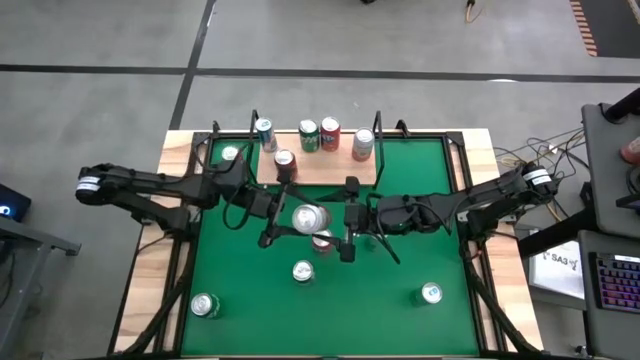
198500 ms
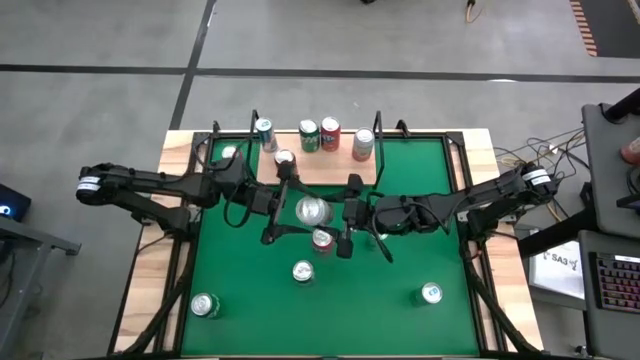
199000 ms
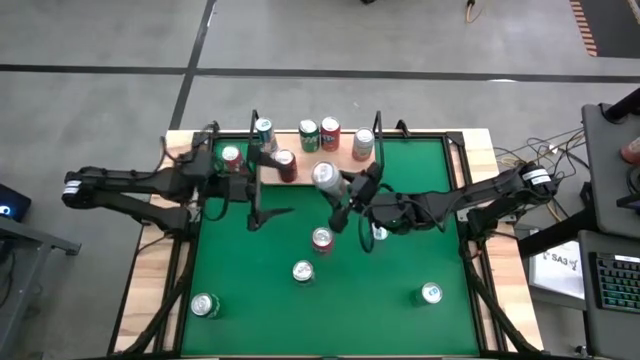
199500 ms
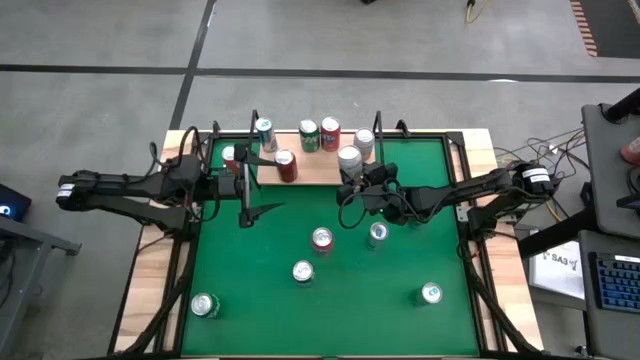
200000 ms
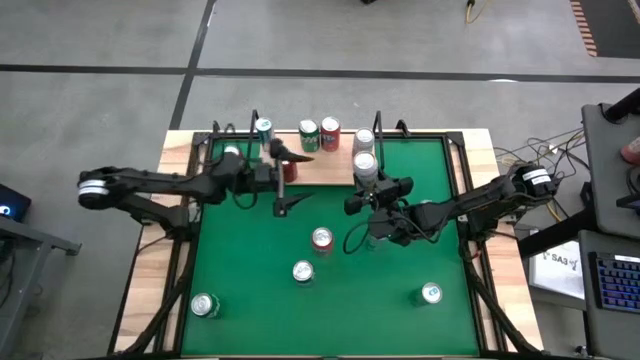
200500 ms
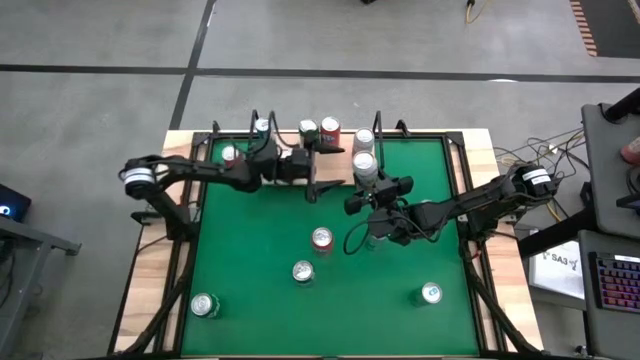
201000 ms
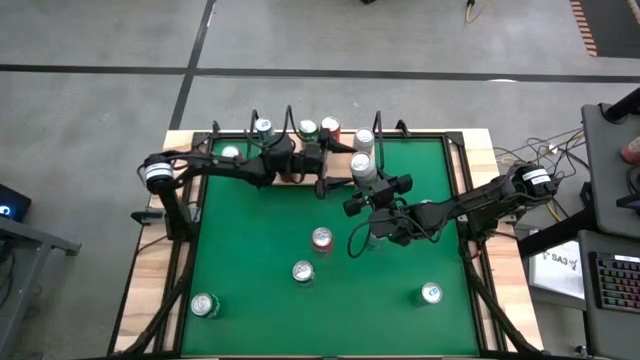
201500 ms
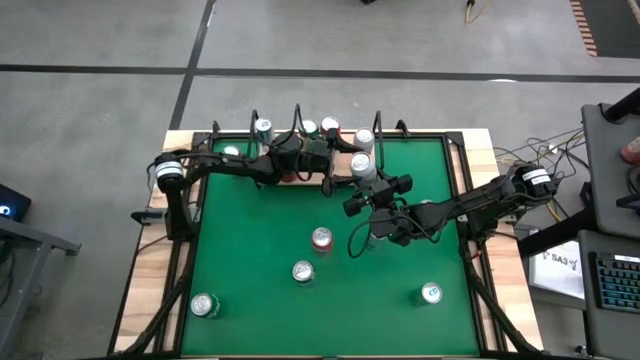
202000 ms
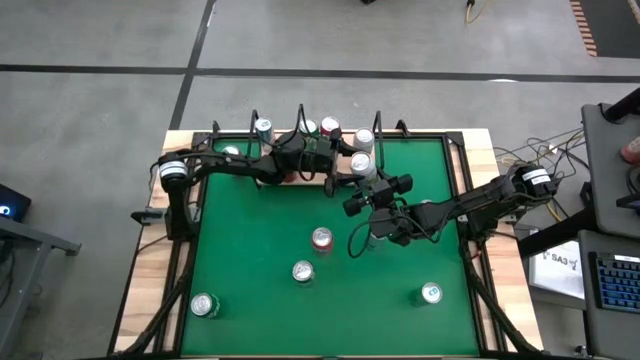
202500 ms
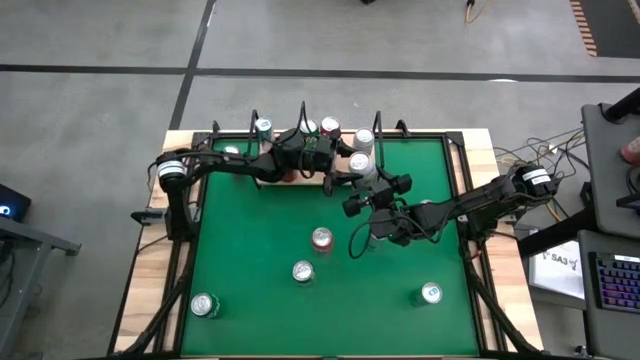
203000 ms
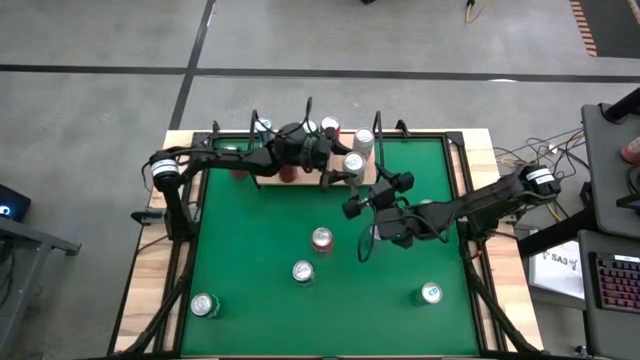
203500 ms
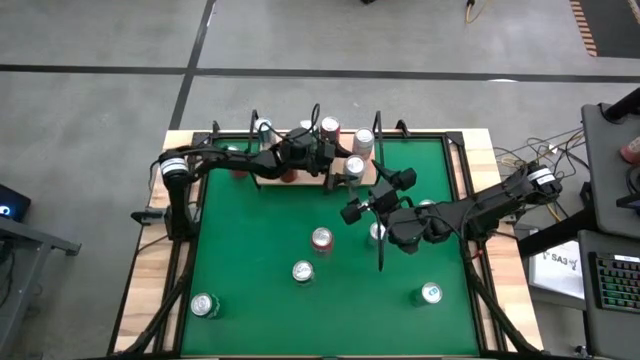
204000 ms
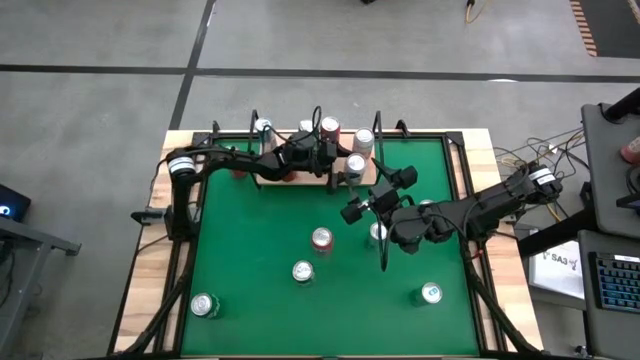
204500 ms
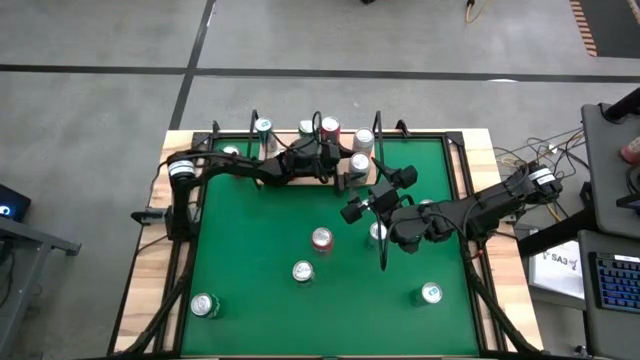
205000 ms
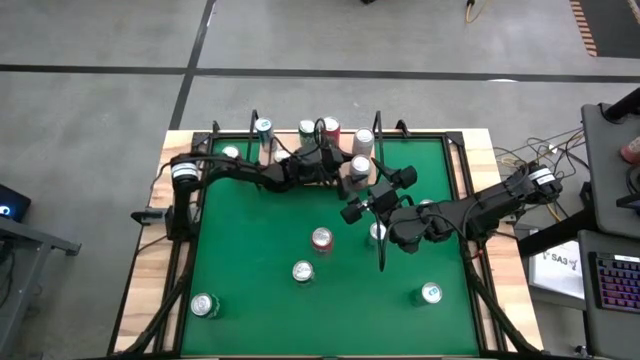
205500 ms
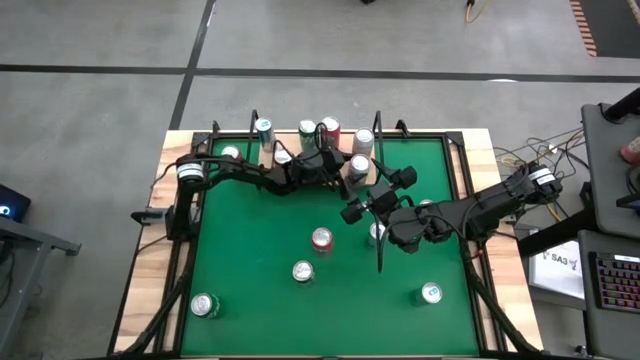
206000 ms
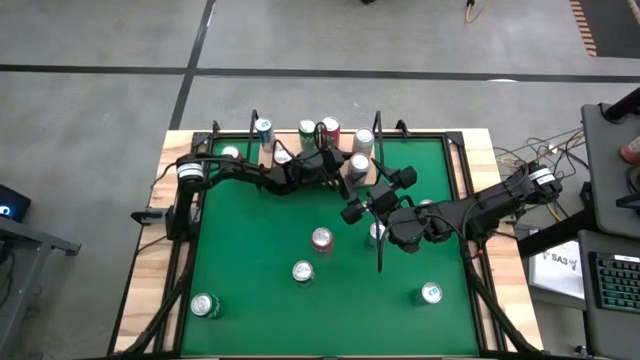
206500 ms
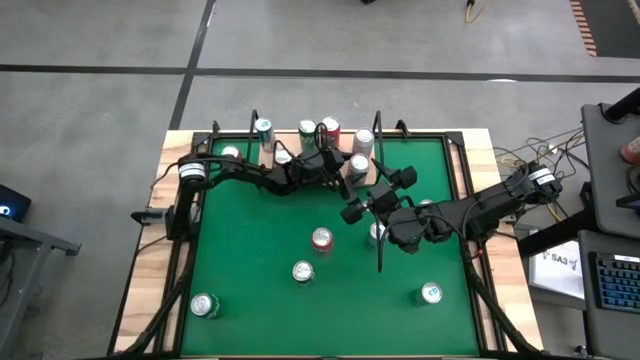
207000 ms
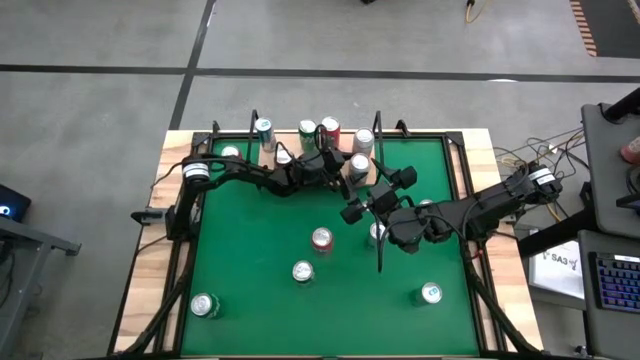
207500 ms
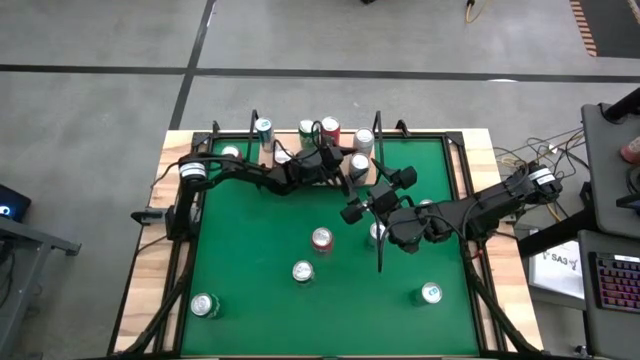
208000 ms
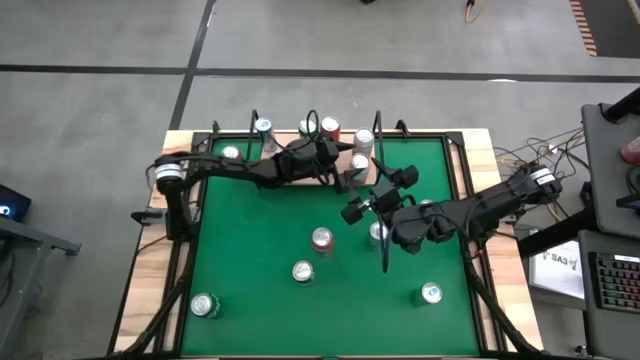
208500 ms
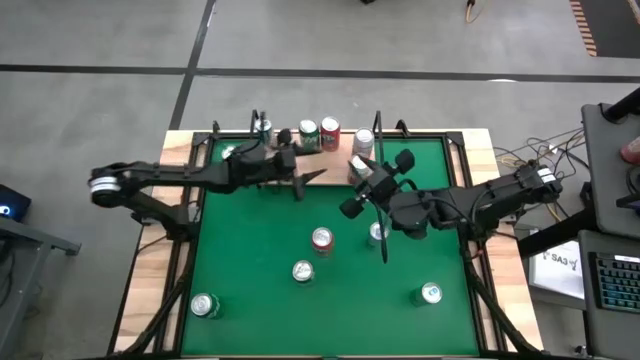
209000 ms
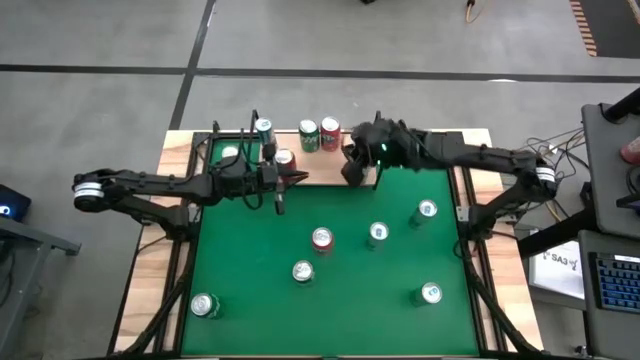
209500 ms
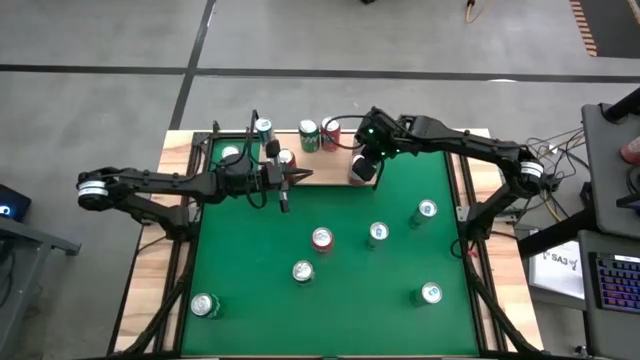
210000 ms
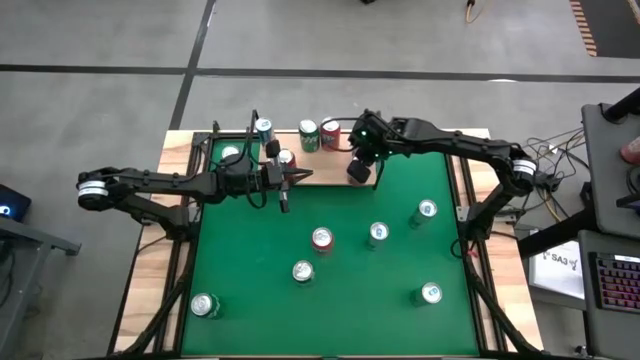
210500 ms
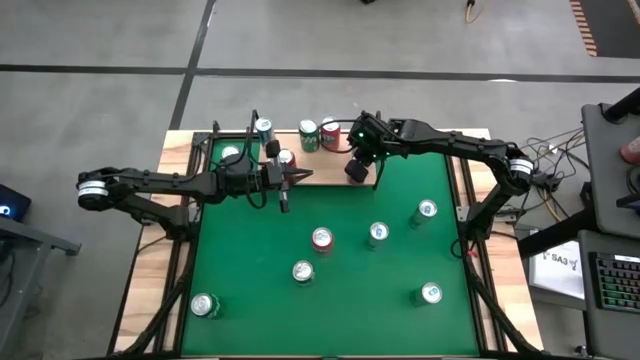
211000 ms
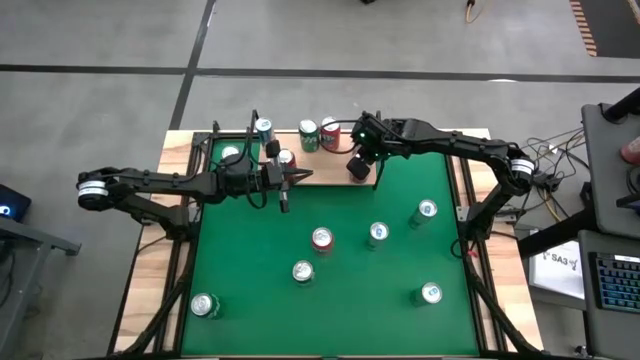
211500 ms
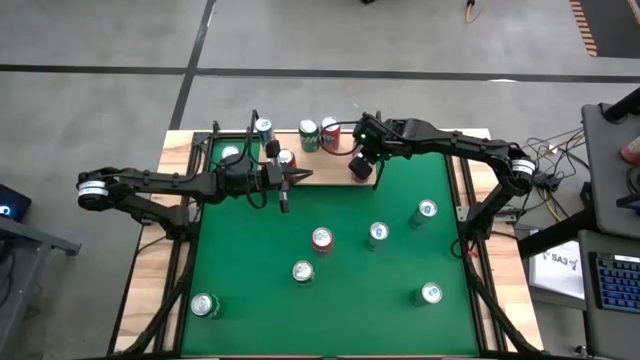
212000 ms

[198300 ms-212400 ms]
Task: Pick and place cans onto a shelf
Put the pink white soda can on the shelf aligned with the other pink white soda can

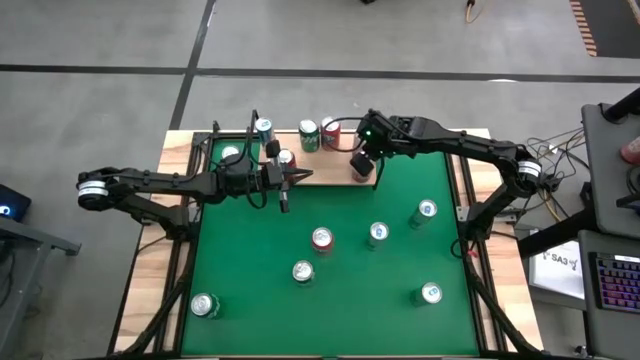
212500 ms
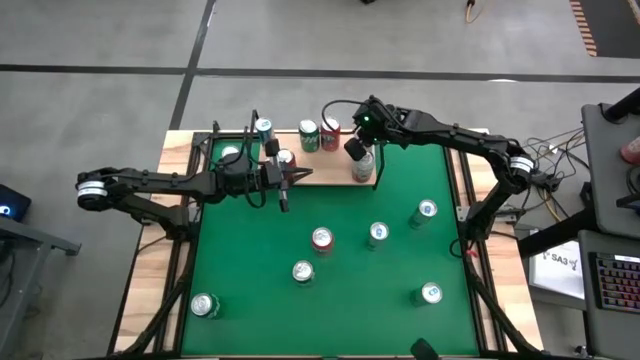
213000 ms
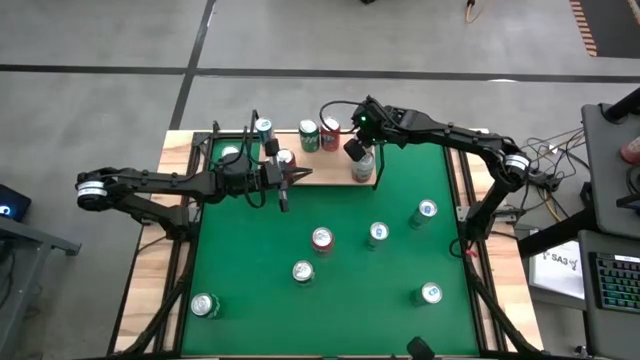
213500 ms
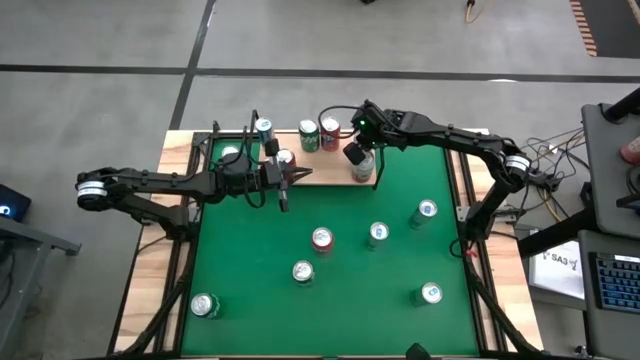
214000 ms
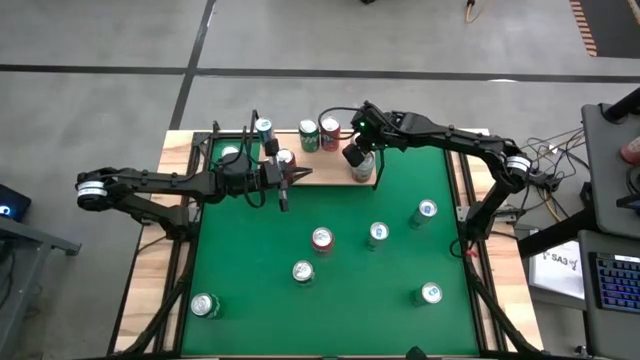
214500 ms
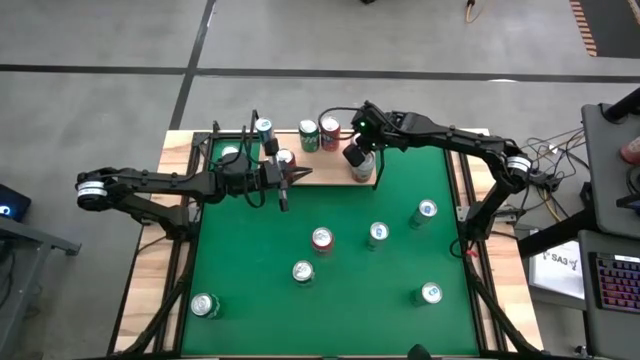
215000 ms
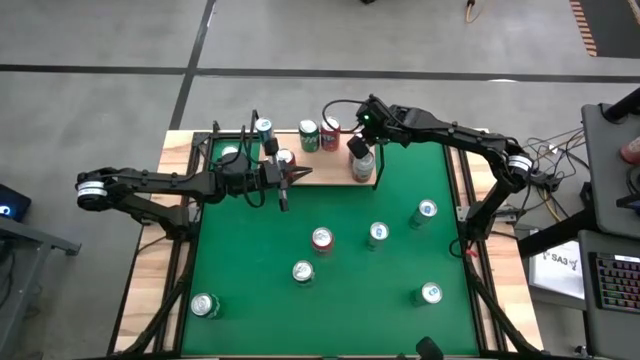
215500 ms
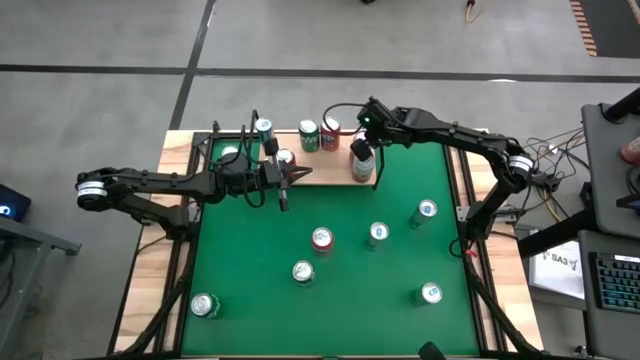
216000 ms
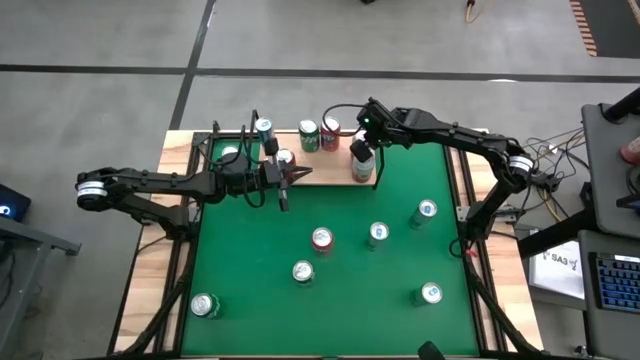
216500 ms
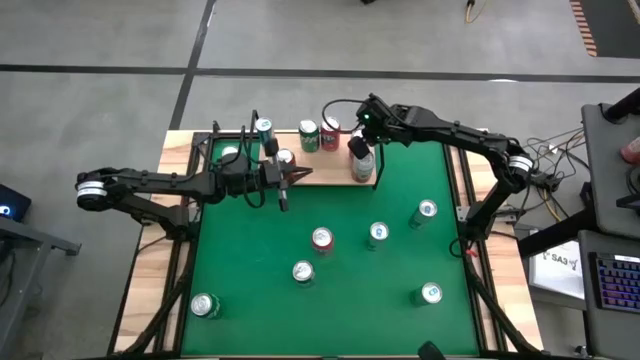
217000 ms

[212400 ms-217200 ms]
Adjust the pink white soda can on the shelf

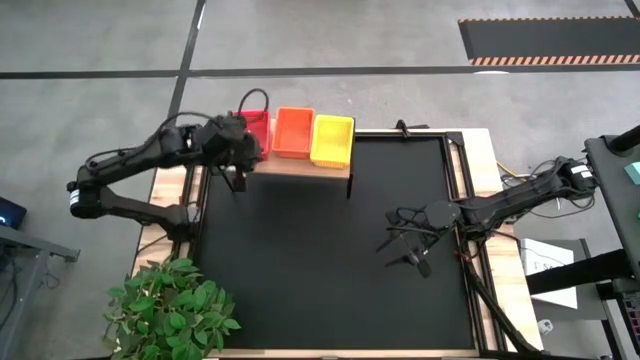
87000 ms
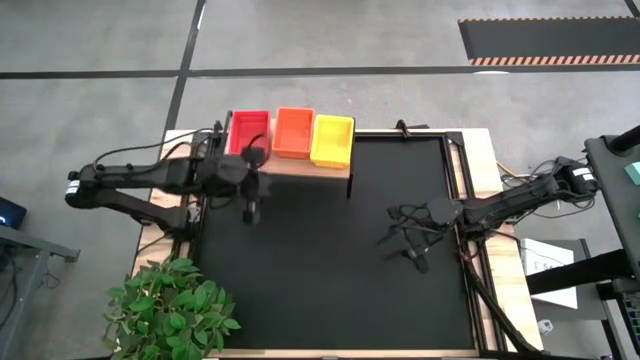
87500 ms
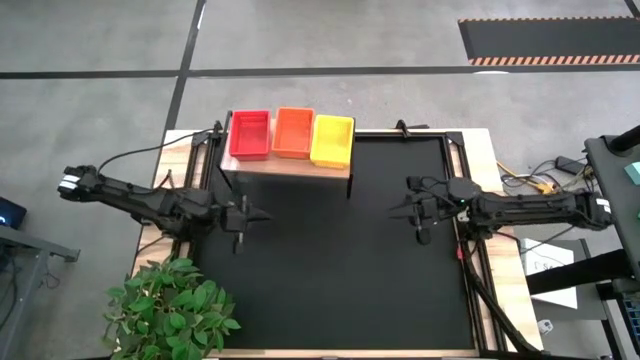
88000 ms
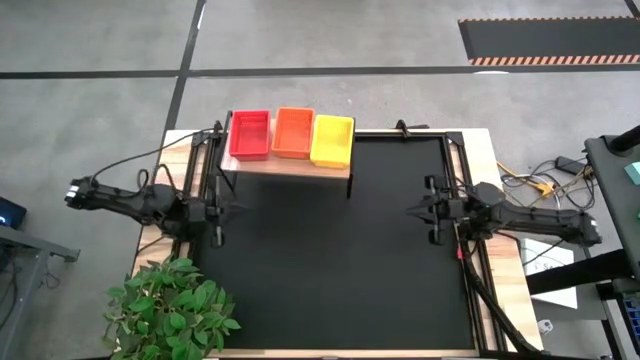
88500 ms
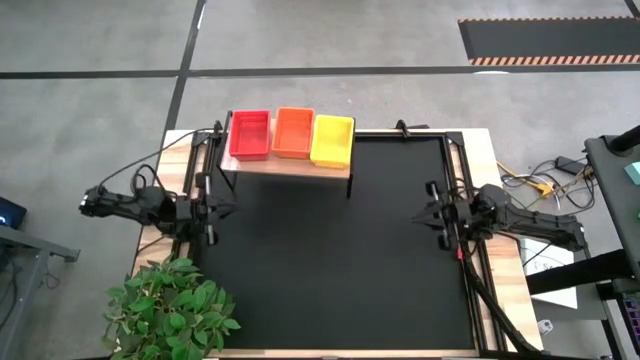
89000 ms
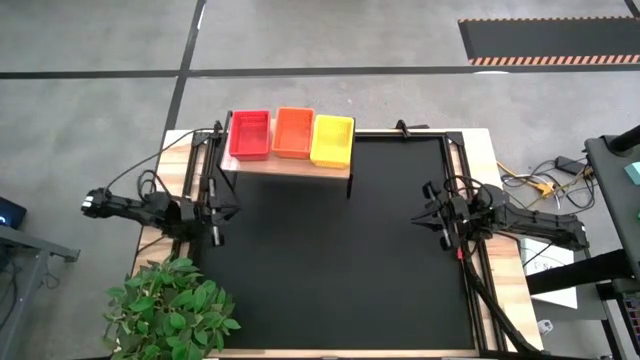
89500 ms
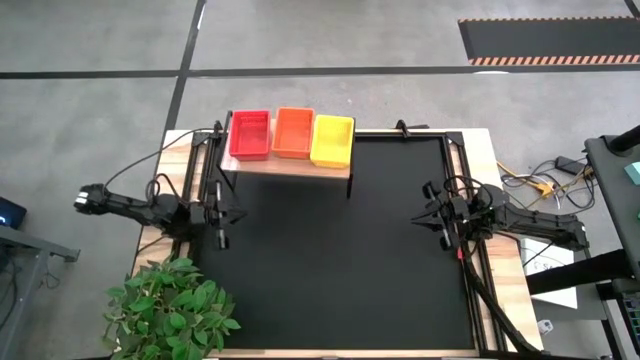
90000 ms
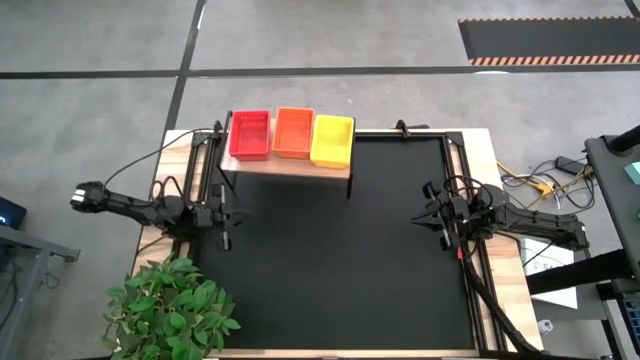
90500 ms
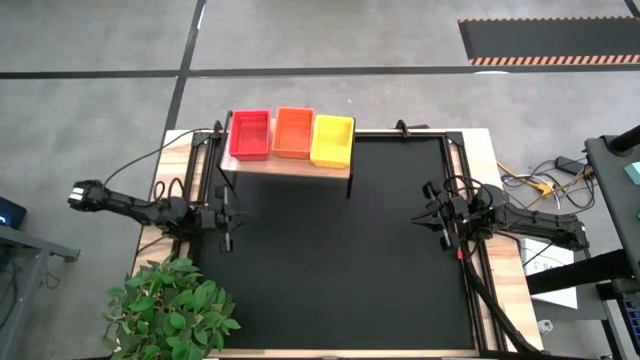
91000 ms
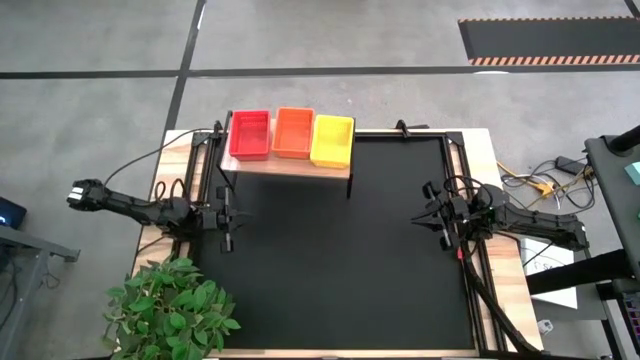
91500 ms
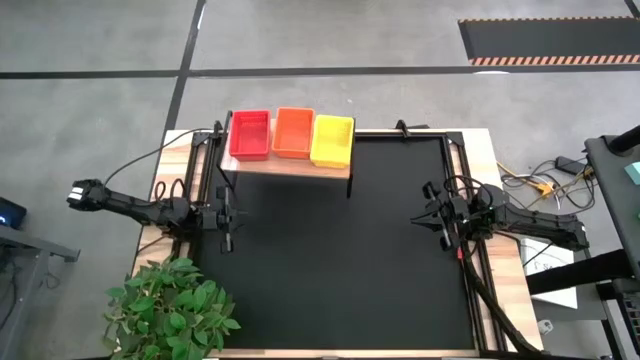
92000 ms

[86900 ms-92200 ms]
Task: Stack baskets on shelf by color
Return to Home Position
